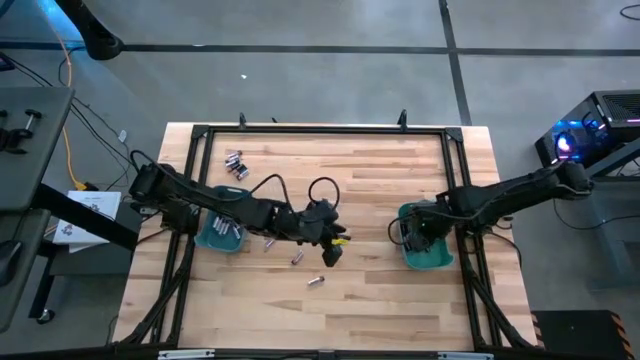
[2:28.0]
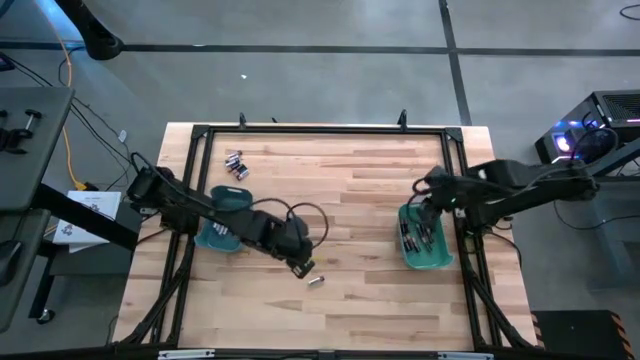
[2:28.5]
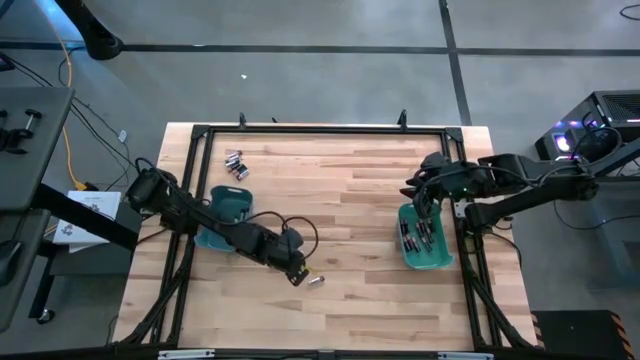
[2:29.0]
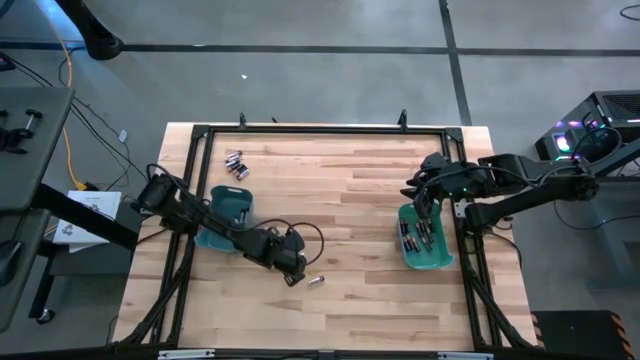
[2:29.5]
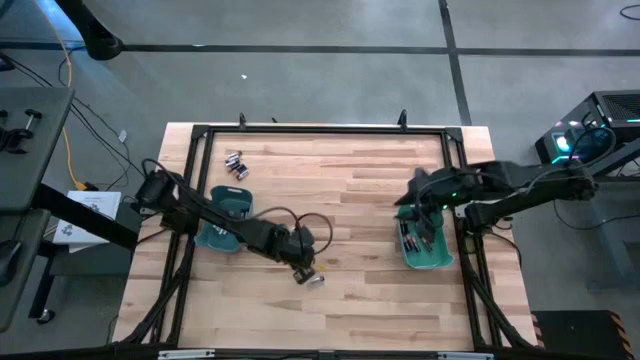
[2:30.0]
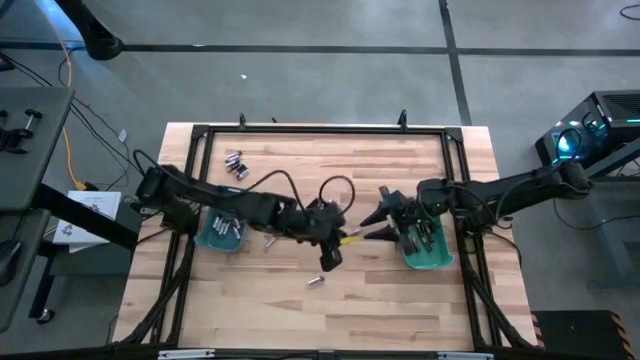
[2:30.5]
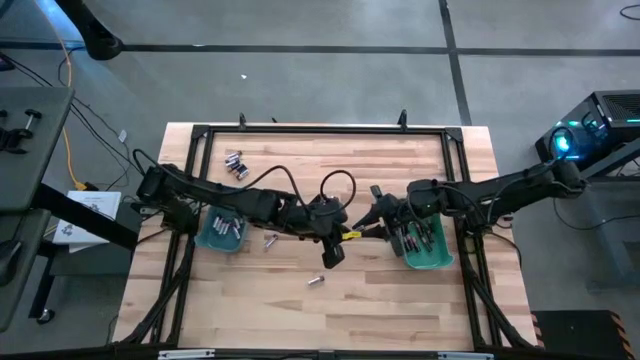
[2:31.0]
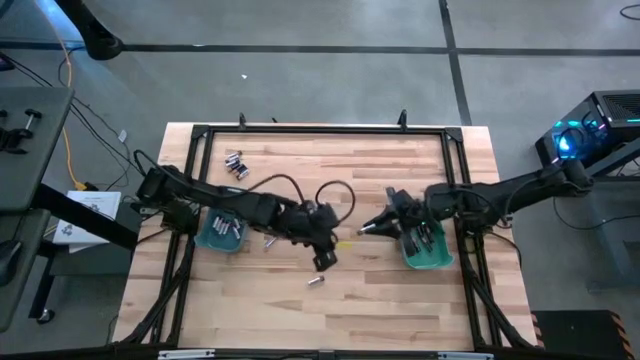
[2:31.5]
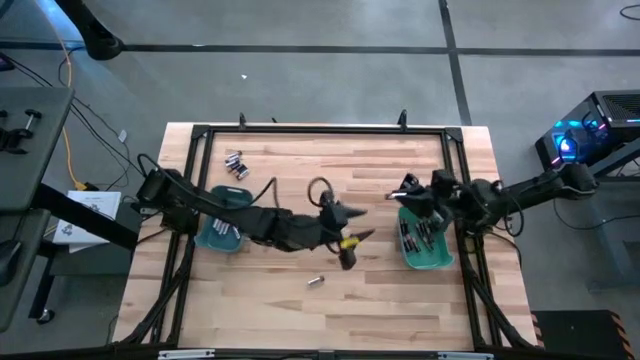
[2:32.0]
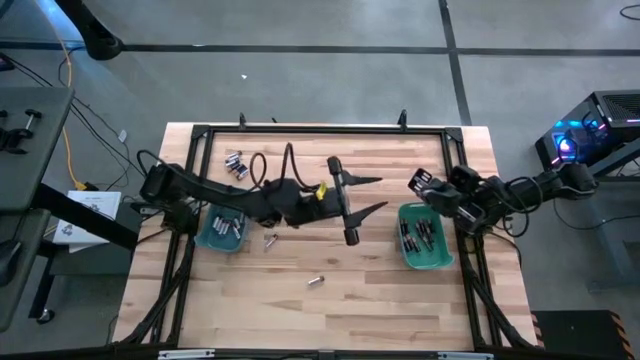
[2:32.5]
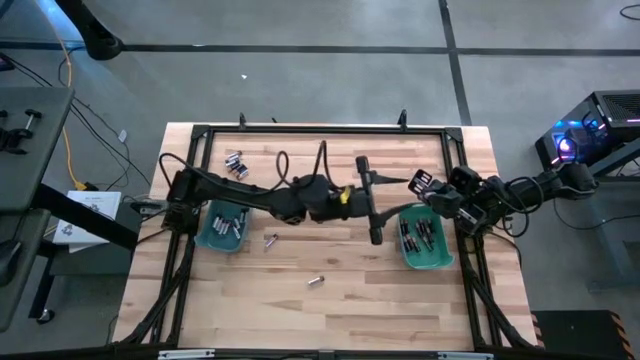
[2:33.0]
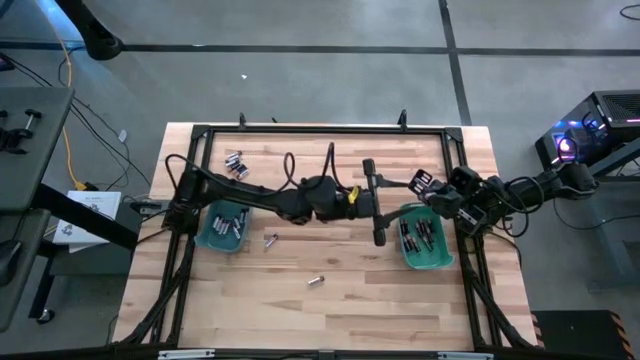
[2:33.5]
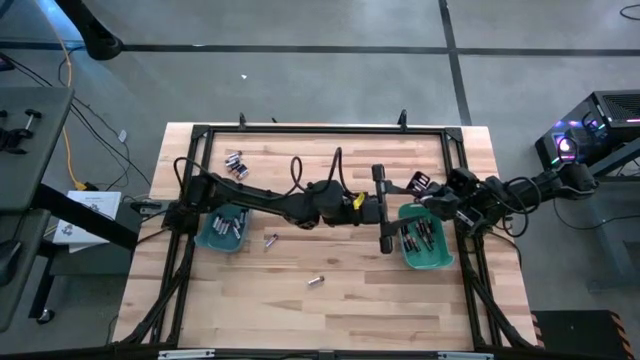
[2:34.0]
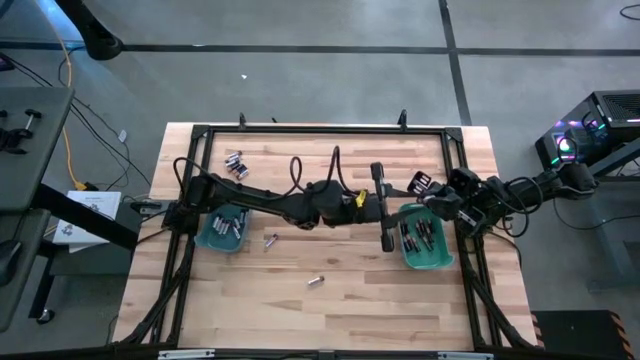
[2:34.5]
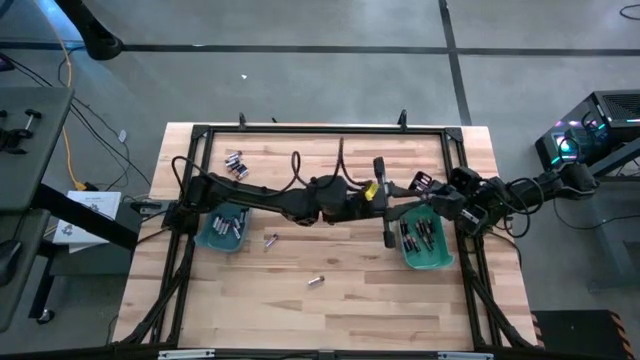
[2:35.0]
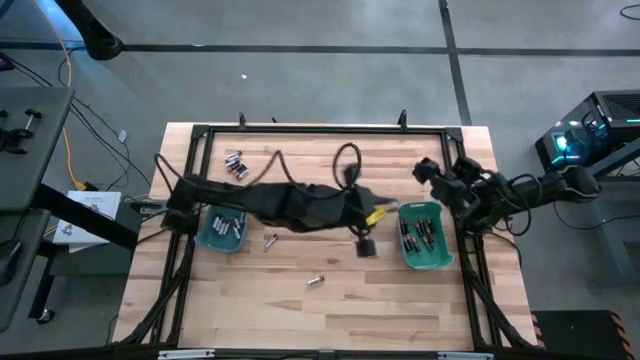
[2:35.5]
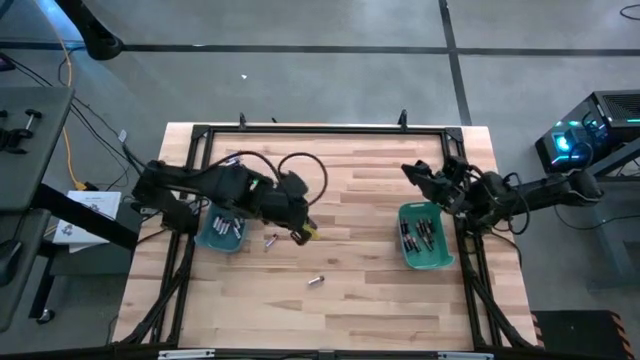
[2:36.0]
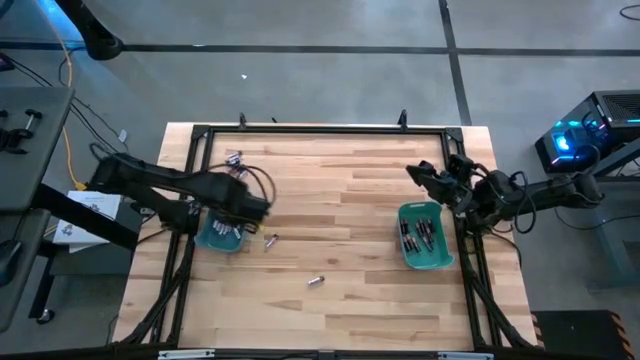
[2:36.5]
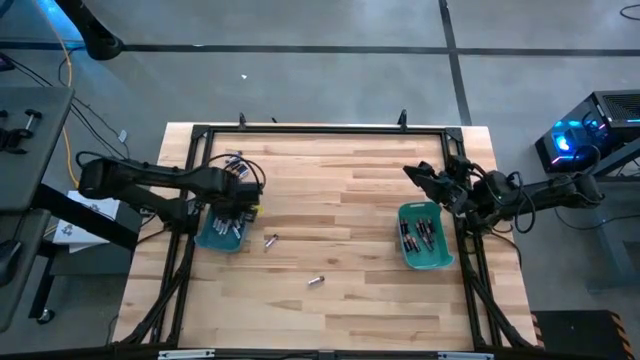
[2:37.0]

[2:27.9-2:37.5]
Task: Sort batteries
Put the silver battery into the blue bin

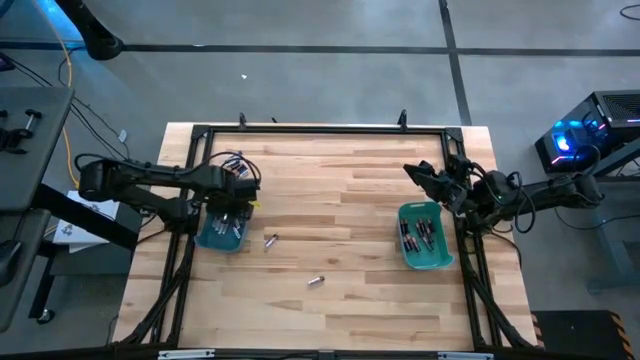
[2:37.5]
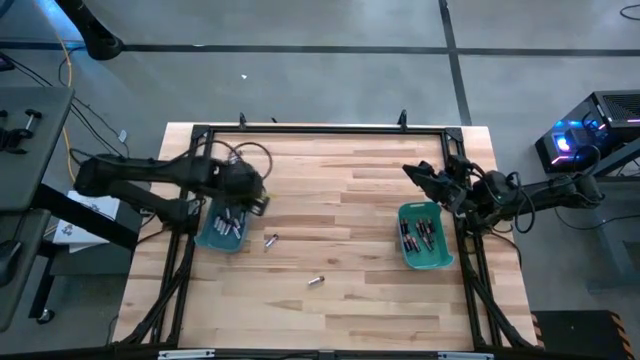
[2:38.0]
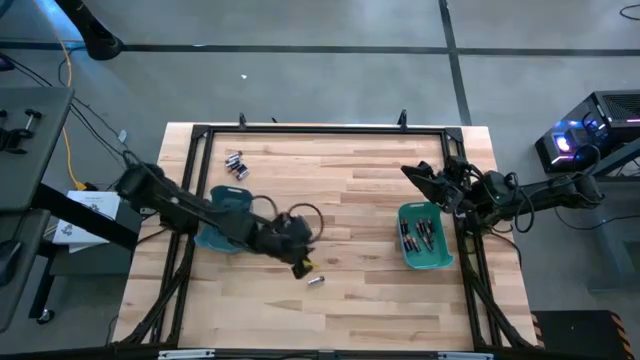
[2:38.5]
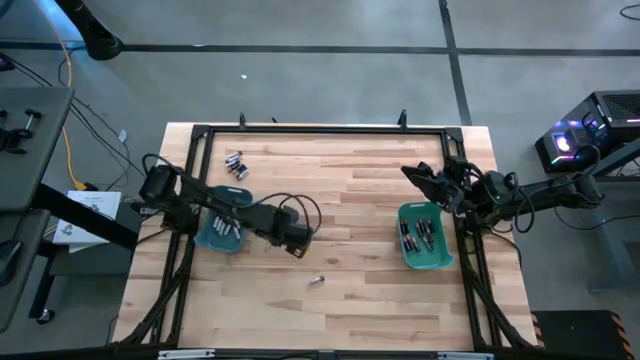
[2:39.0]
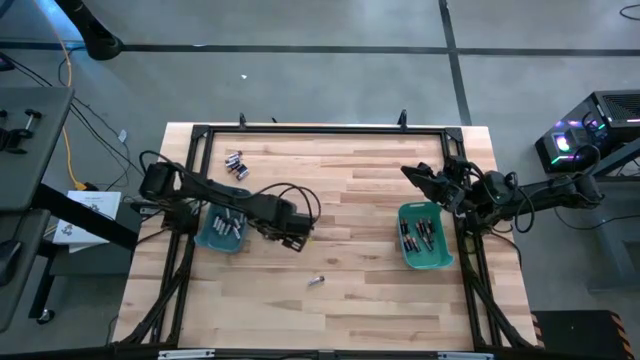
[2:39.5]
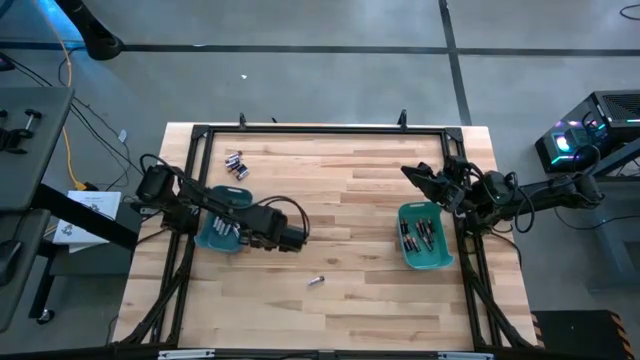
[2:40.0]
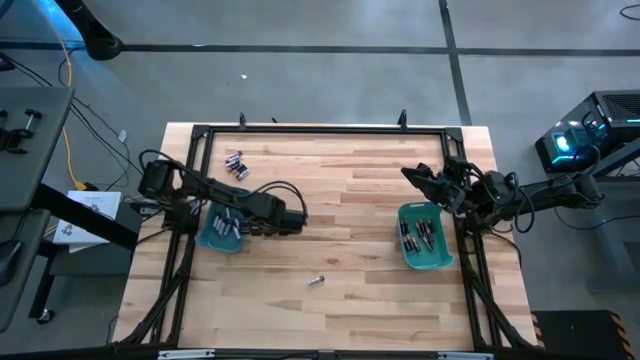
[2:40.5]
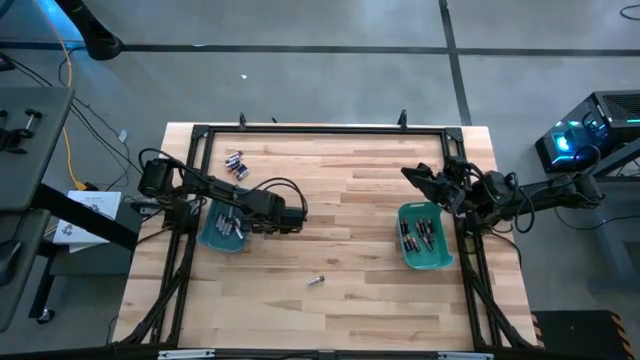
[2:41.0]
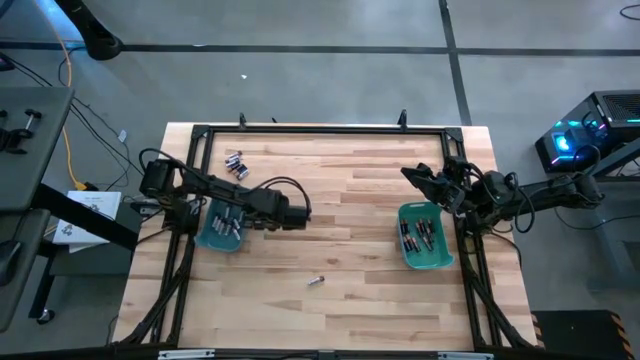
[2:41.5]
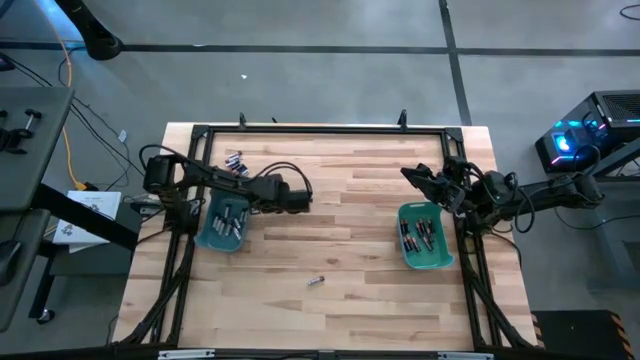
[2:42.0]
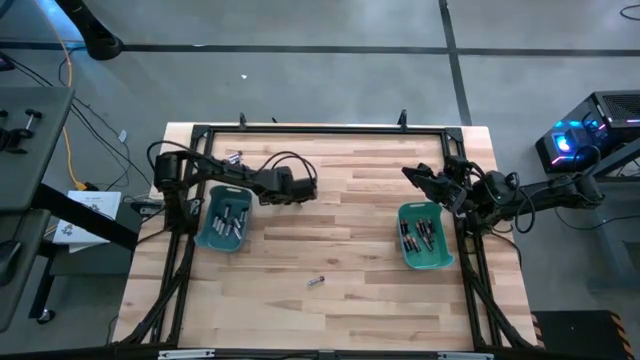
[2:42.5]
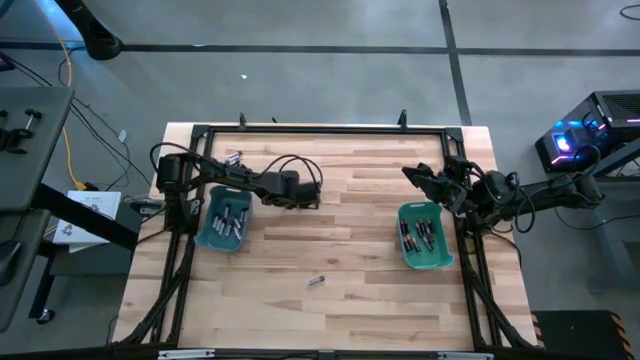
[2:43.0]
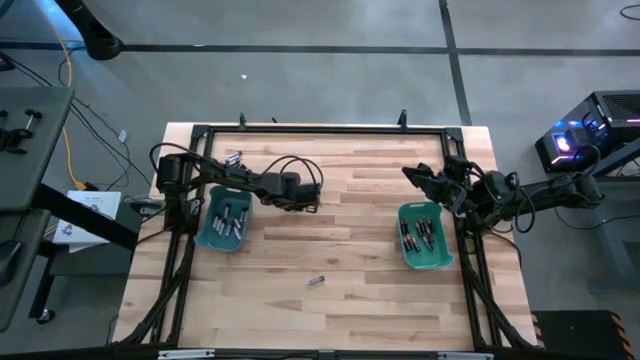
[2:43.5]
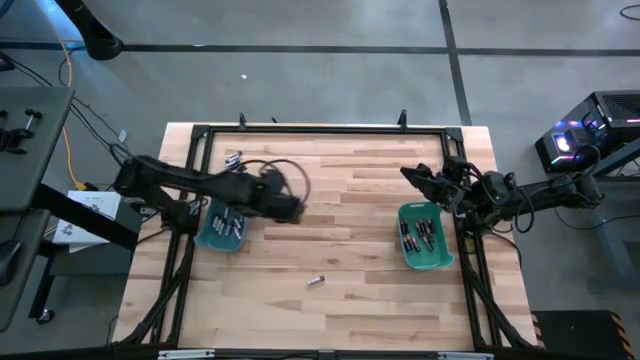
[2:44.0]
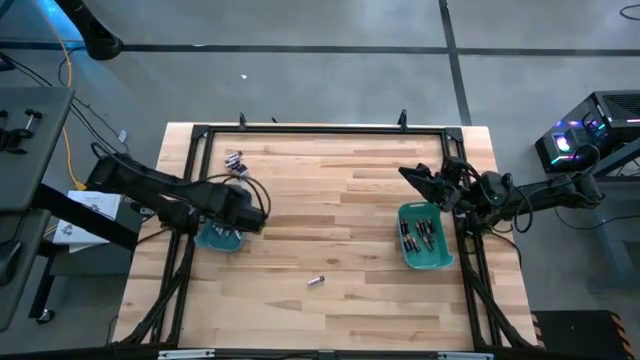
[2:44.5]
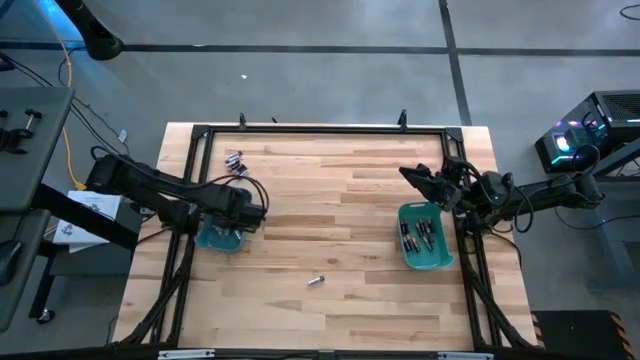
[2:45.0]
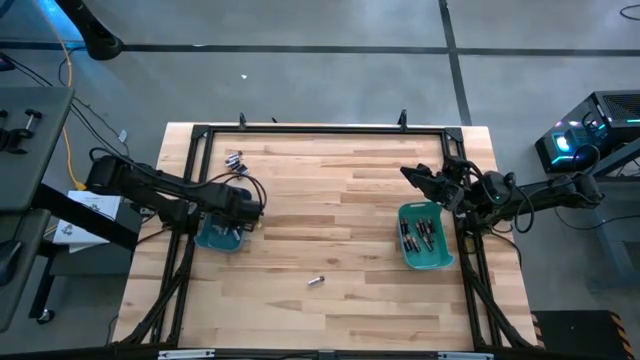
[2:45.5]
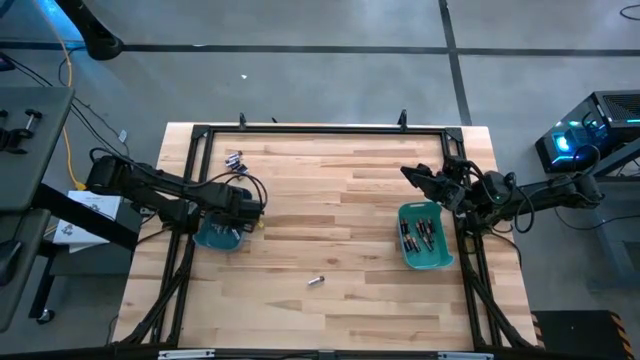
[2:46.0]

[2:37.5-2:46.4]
Put the silver battery into the blue bin

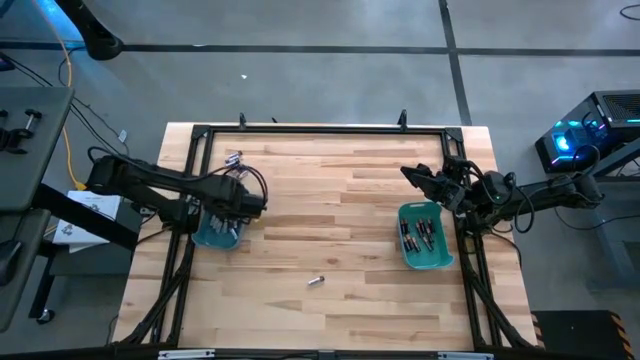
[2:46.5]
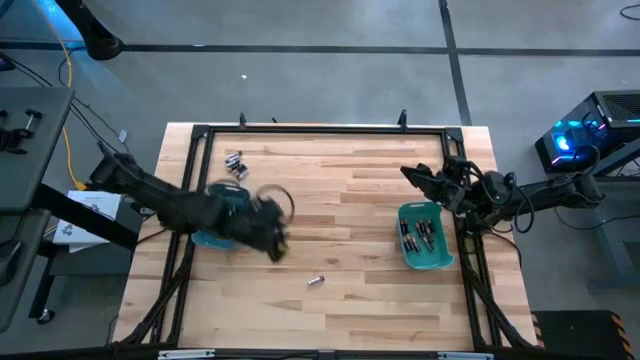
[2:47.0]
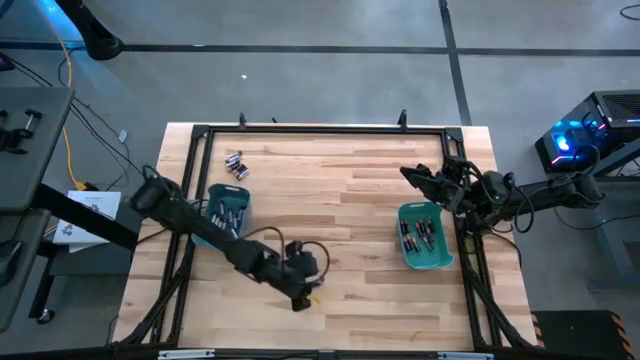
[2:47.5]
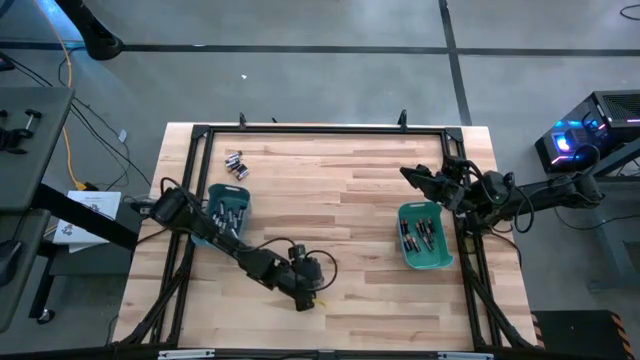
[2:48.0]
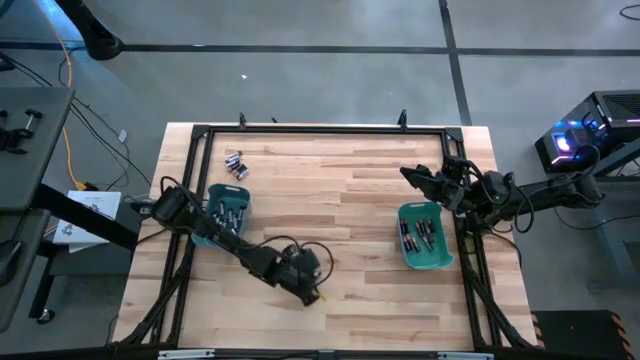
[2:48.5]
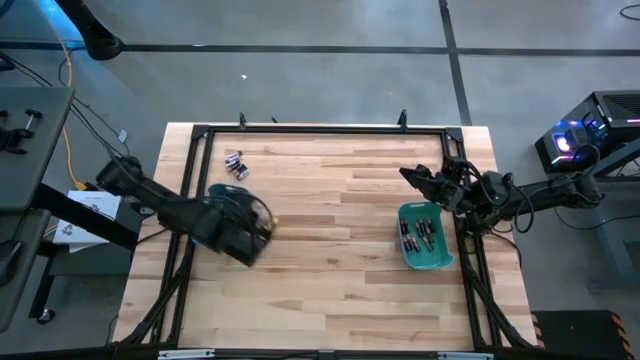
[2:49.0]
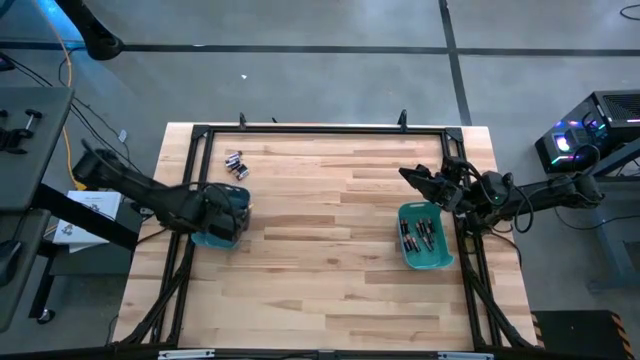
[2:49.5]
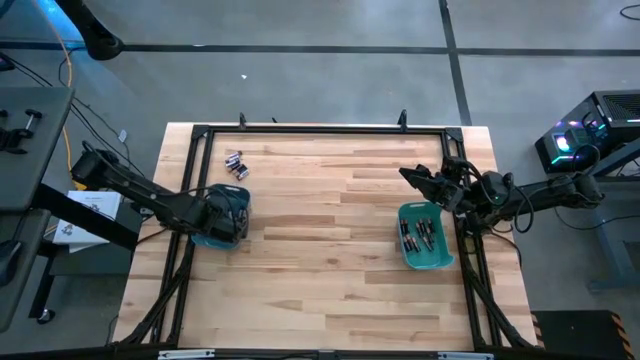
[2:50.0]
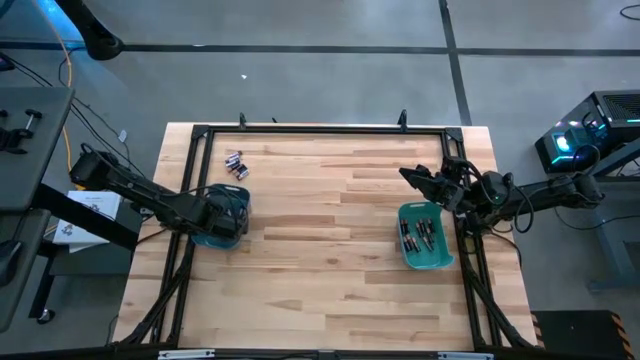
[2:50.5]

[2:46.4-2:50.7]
Put the silver battery into the blue bin
